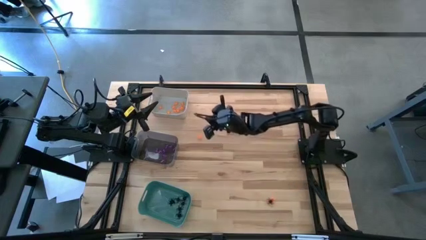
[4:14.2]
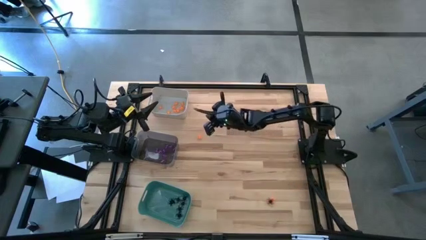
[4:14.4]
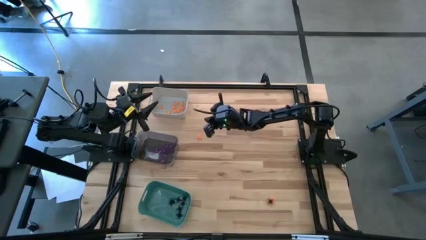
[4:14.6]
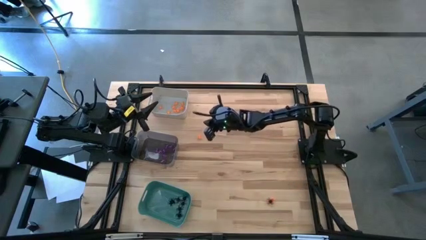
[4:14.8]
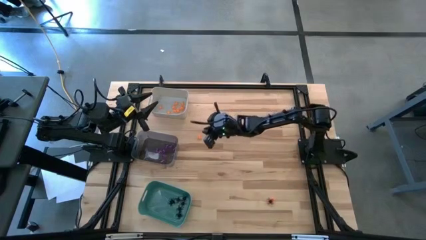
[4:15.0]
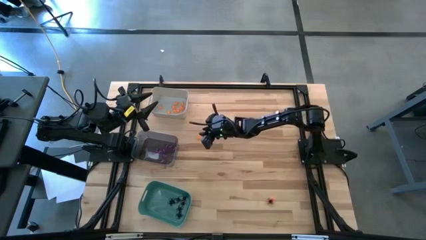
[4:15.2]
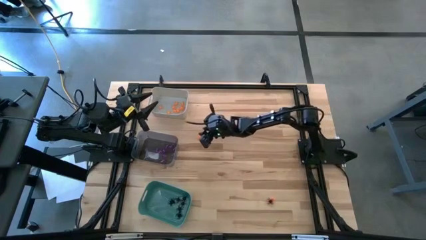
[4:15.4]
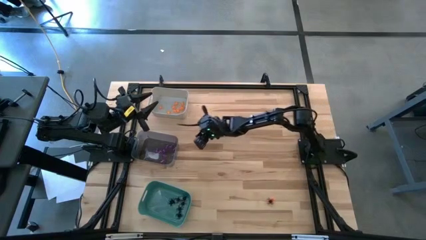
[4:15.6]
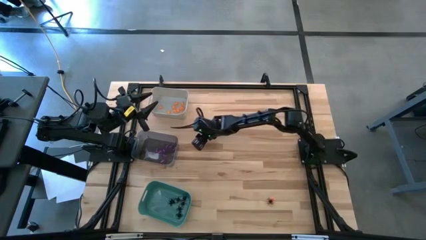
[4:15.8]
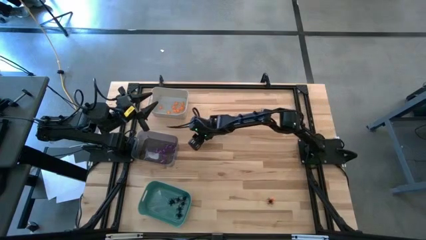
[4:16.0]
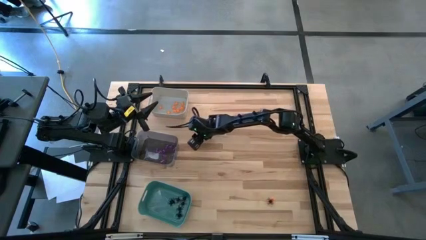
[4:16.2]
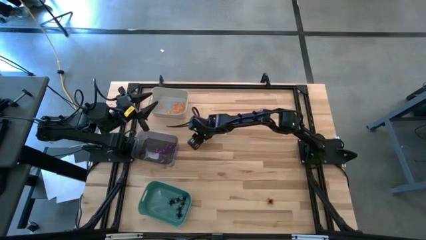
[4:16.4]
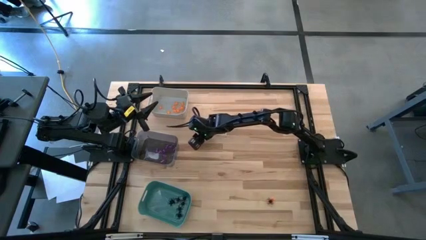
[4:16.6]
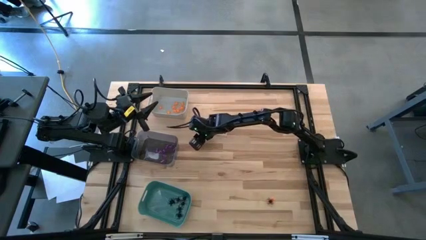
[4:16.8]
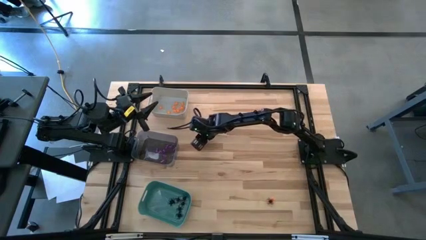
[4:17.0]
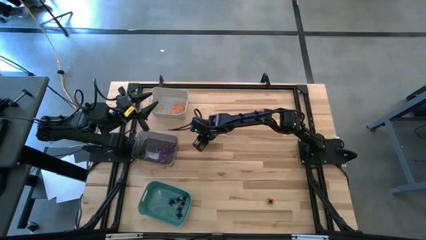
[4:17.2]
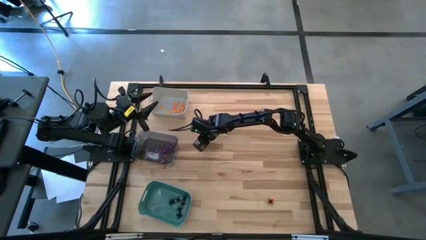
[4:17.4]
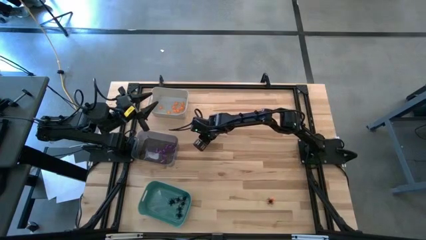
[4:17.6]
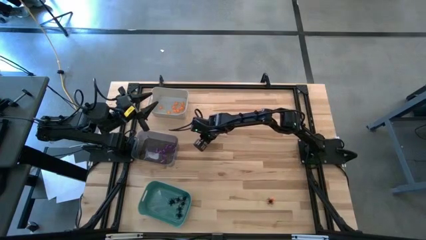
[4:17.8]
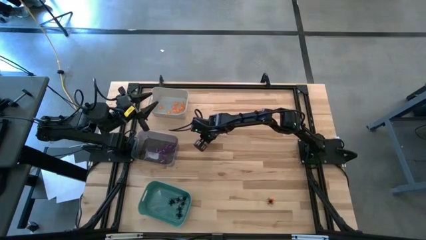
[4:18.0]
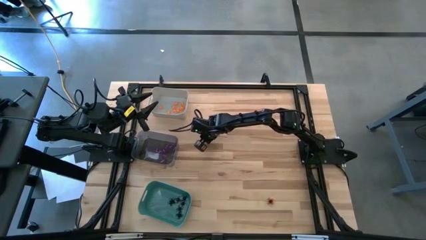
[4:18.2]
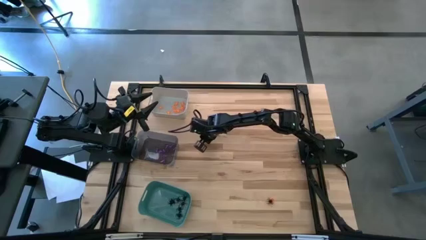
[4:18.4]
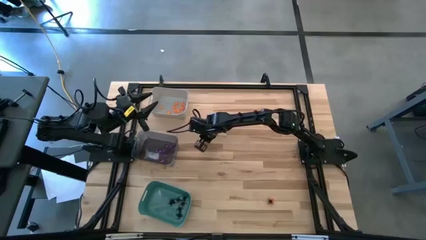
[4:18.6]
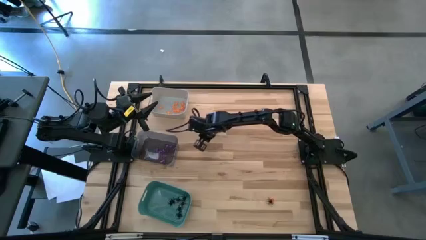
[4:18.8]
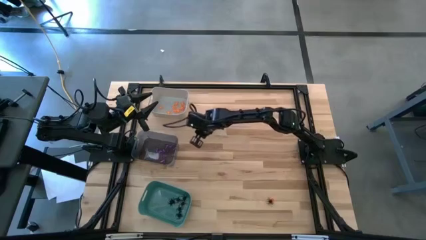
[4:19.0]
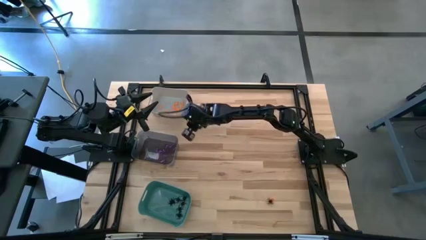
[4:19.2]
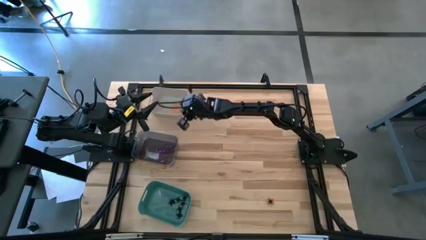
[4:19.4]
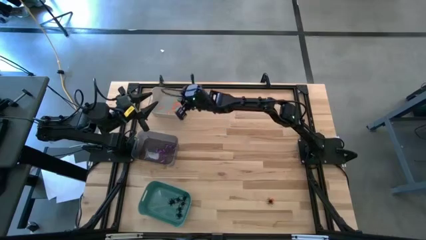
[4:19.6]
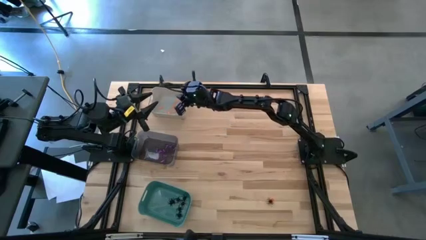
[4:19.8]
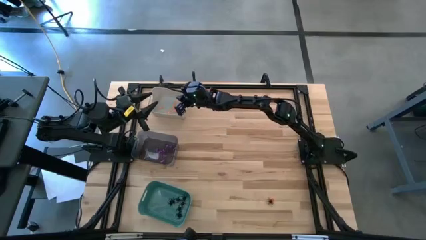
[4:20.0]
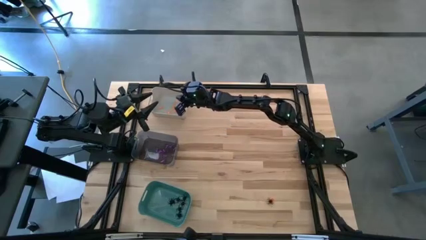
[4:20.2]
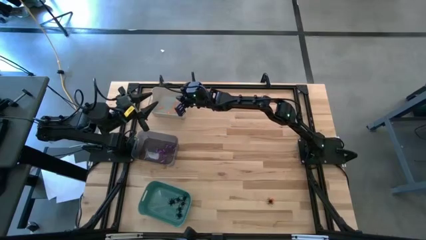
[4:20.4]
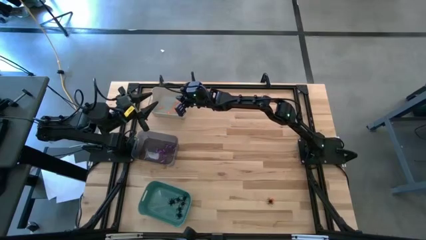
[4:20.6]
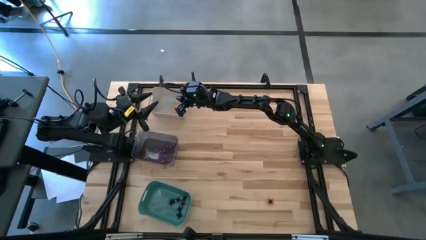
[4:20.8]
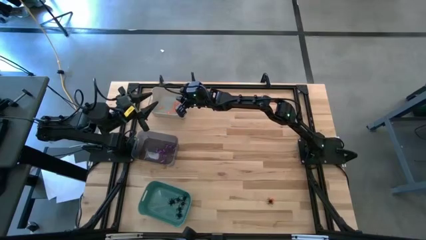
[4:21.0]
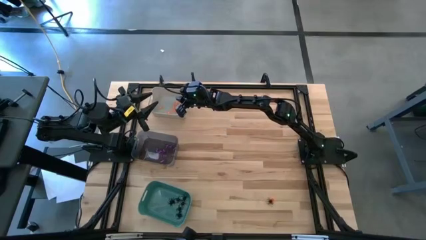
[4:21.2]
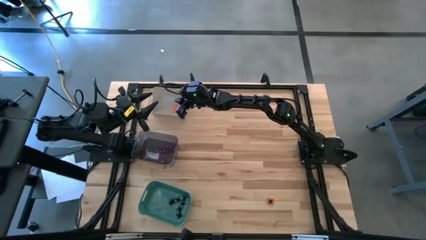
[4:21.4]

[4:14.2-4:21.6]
Task: Sort Halloween decoration
Put the right orange spider into the gray bin

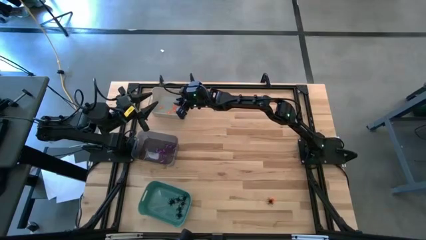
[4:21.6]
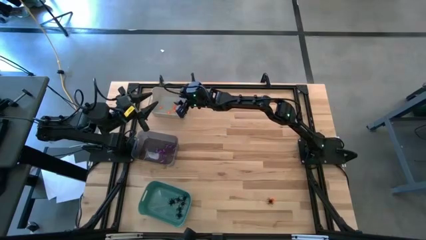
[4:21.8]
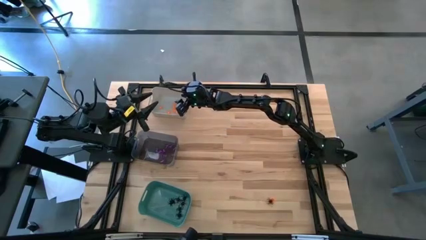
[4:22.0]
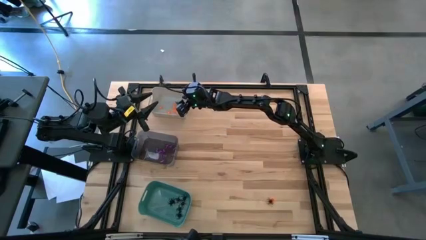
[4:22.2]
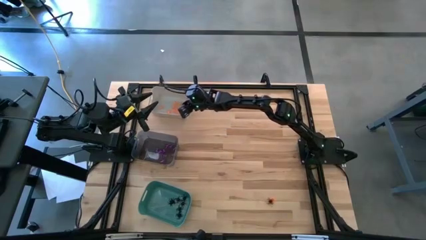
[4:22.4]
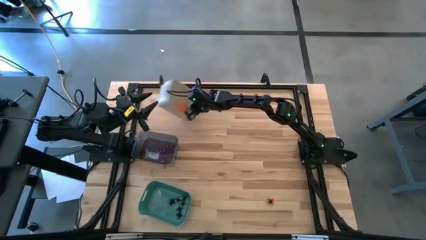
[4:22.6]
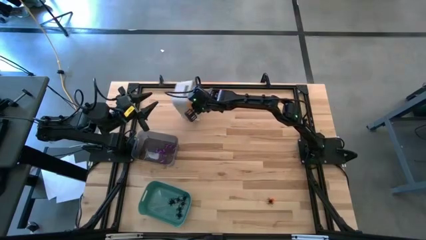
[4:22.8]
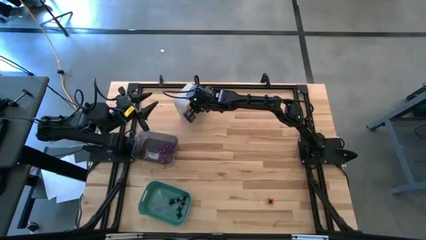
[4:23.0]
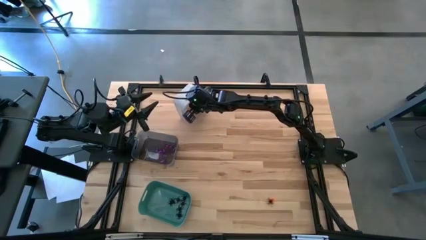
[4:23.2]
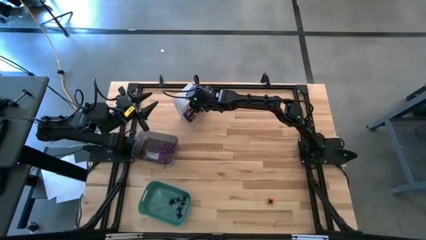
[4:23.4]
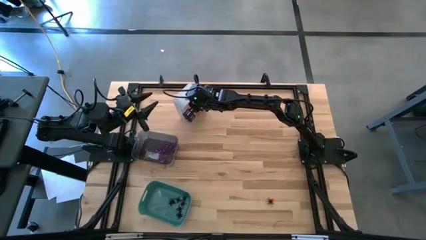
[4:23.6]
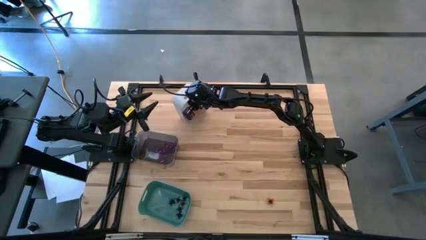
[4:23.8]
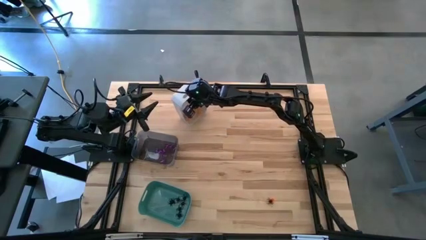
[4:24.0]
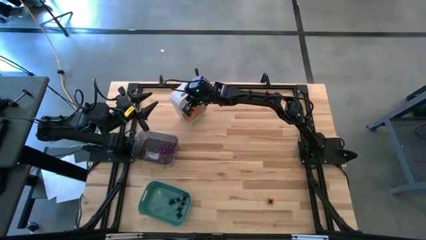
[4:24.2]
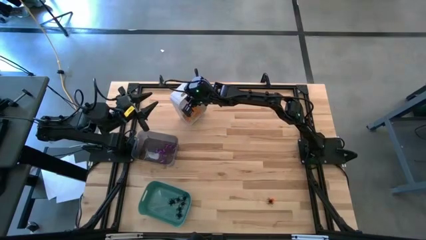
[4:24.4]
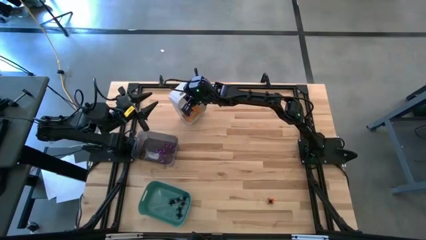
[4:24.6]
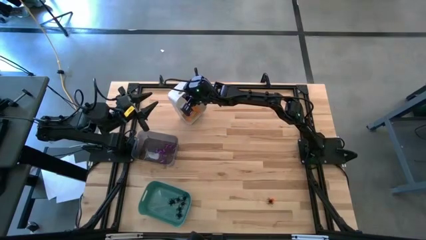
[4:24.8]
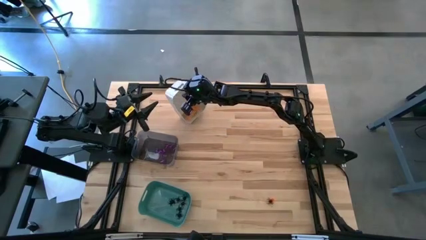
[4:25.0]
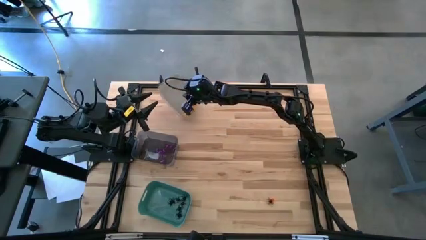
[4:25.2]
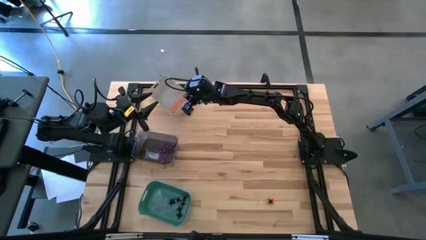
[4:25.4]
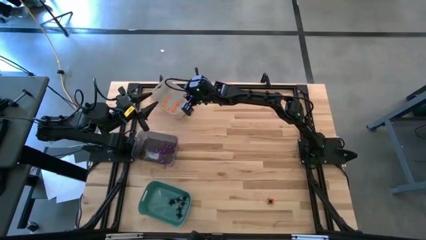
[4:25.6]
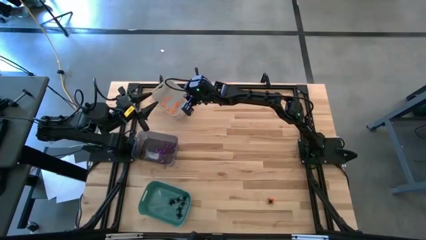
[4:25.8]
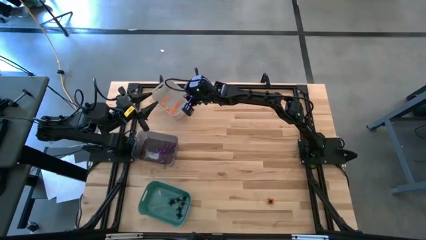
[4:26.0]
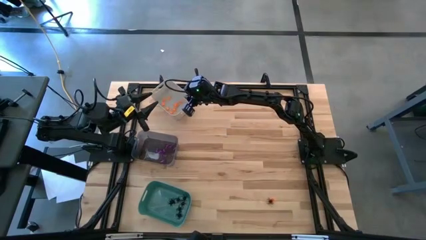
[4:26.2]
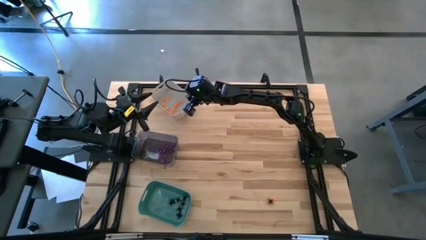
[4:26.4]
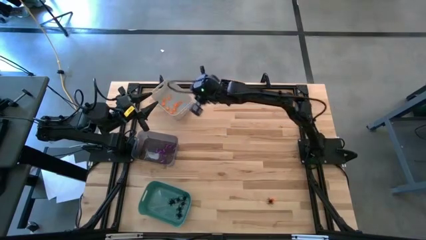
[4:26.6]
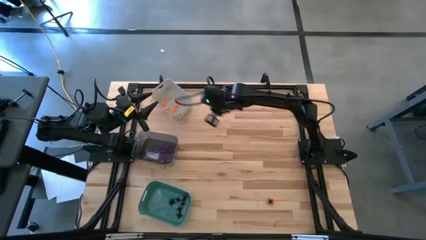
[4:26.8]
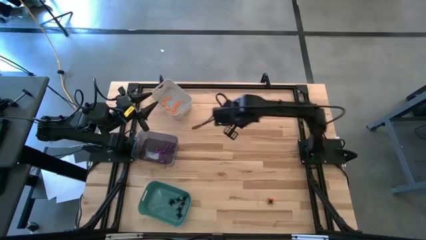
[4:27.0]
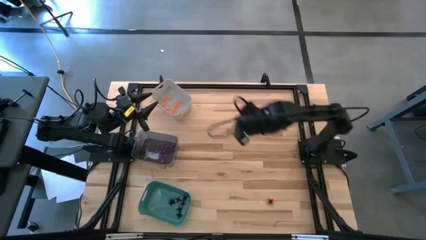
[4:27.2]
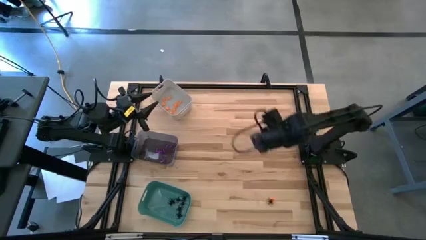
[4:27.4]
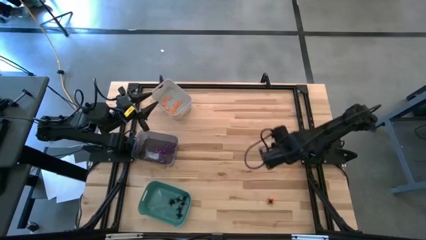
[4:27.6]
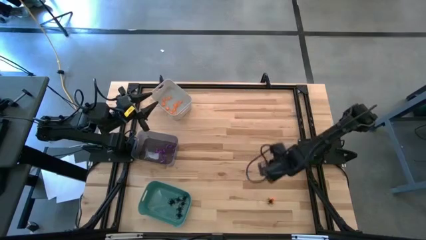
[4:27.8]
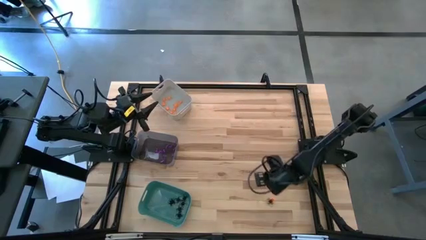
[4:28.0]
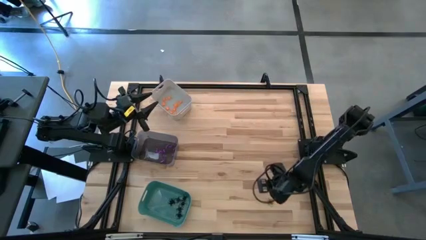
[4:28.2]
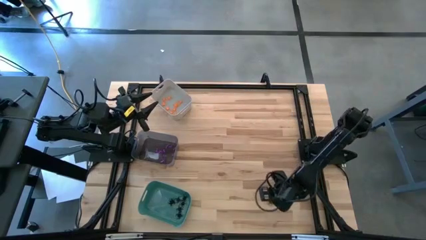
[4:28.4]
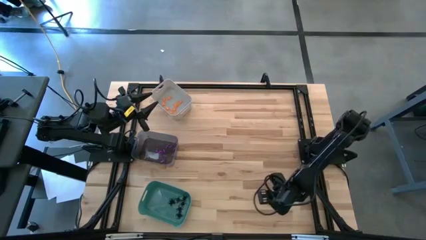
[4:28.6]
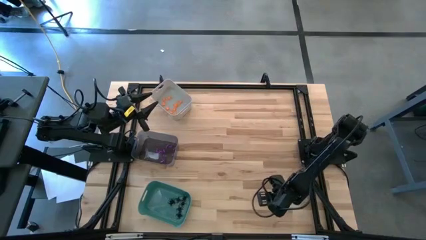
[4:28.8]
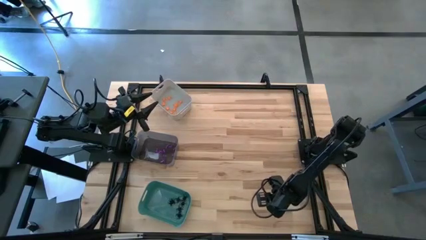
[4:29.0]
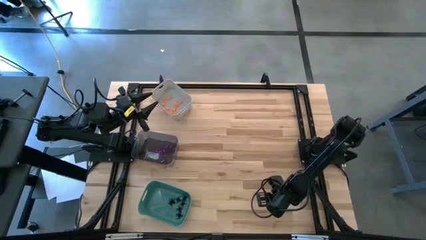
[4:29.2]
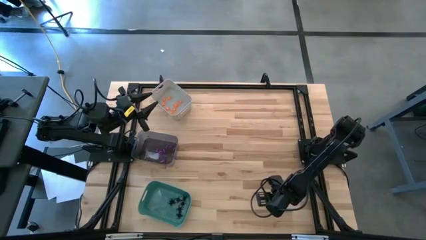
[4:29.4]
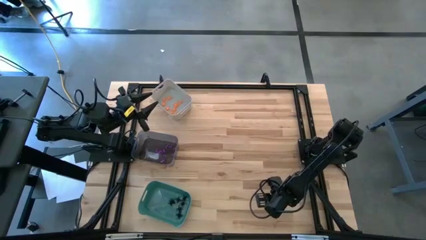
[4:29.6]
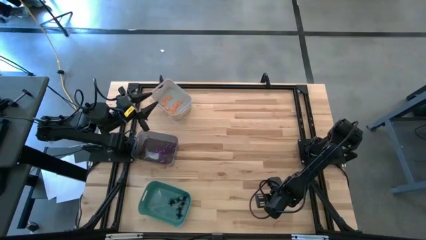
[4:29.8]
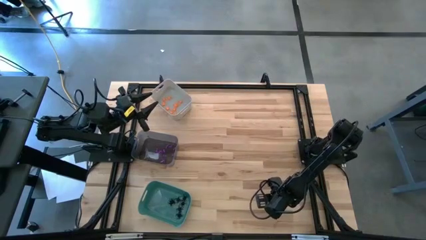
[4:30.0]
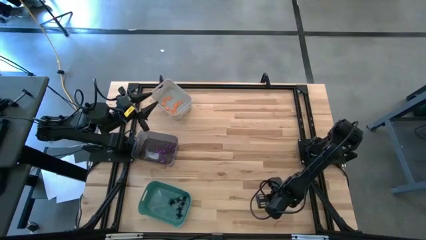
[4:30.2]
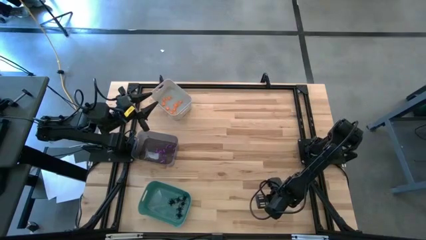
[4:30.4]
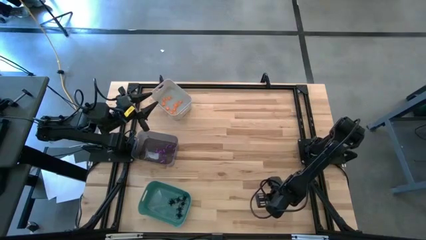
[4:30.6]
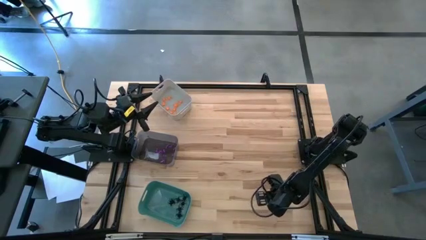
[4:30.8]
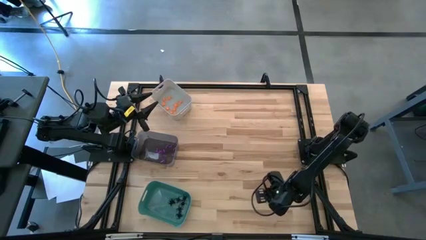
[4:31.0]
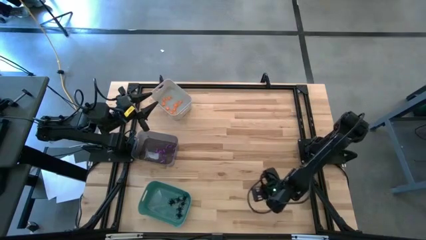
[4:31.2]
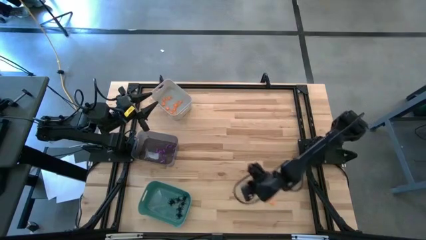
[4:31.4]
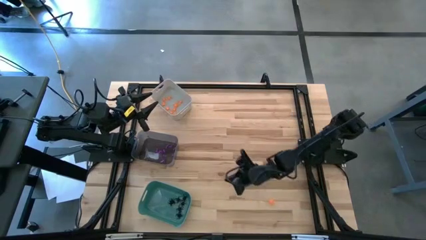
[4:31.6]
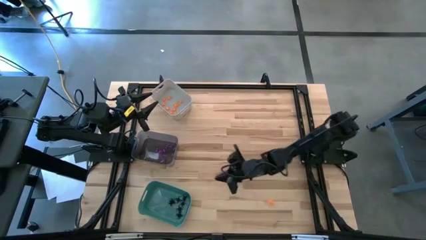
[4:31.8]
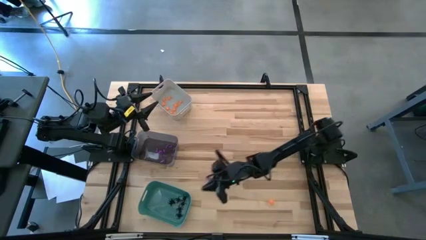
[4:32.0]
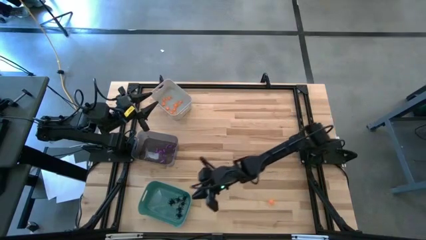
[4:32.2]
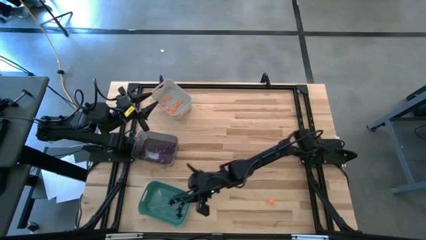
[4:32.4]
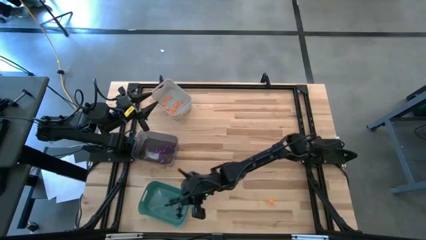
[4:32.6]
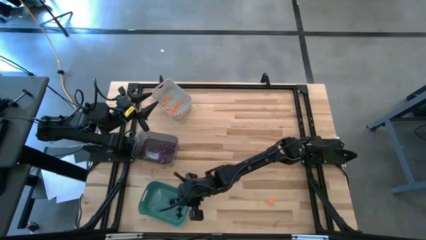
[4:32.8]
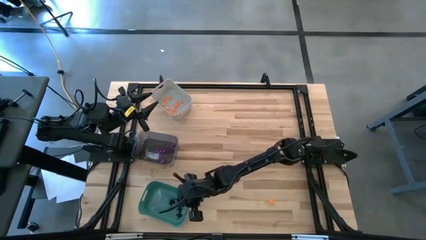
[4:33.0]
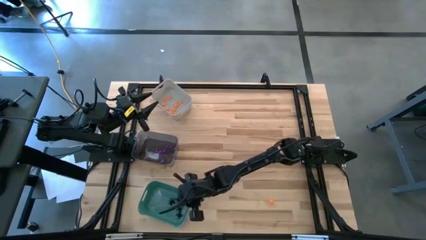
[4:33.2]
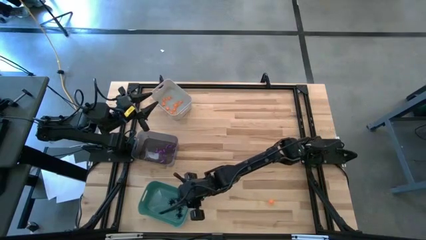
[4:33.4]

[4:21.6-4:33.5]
Put the black spider into the green bin
